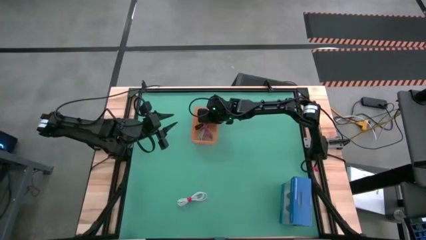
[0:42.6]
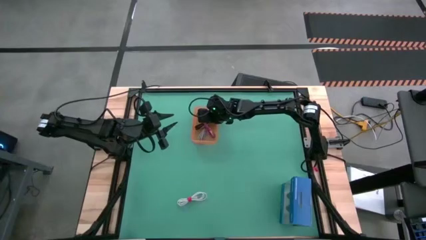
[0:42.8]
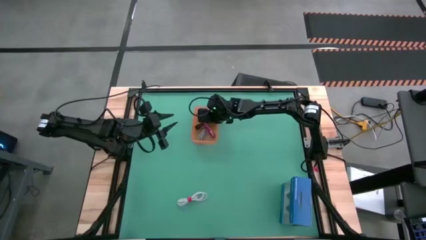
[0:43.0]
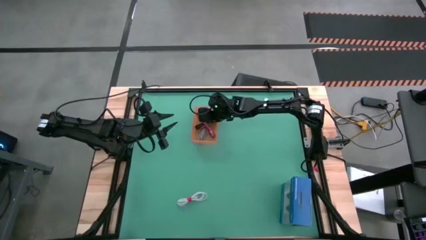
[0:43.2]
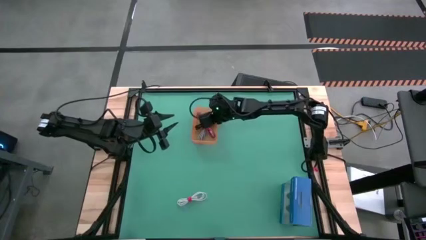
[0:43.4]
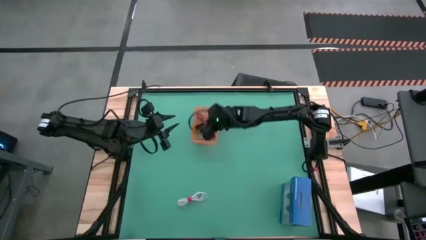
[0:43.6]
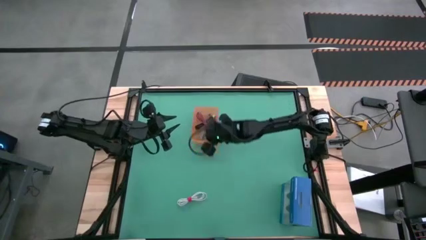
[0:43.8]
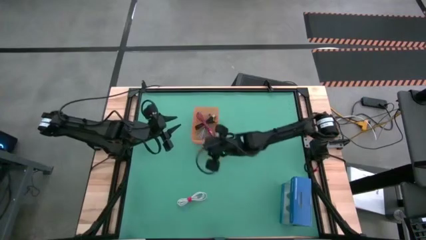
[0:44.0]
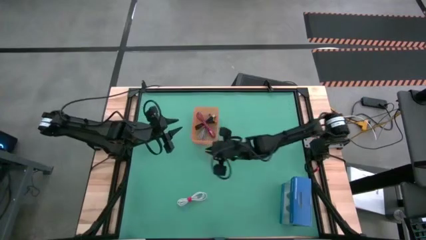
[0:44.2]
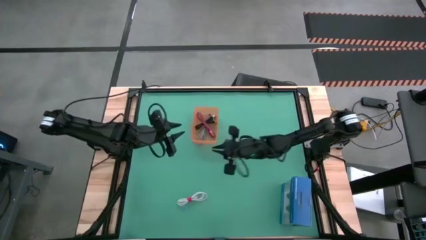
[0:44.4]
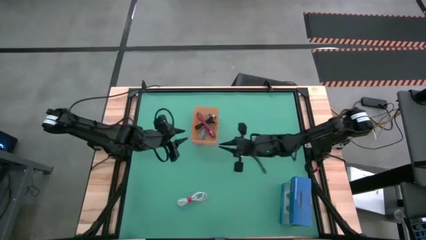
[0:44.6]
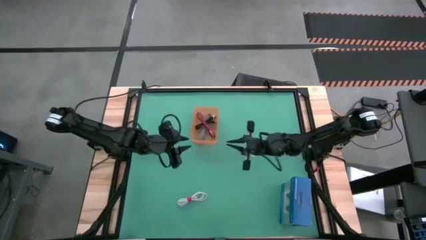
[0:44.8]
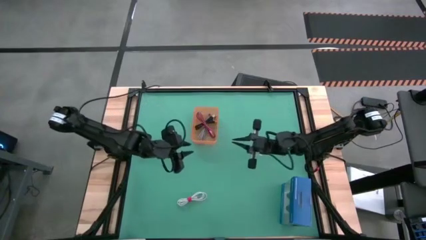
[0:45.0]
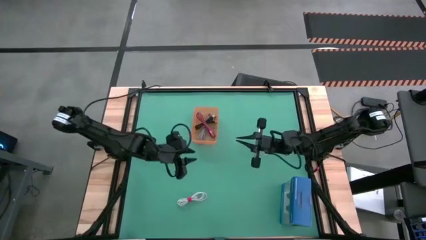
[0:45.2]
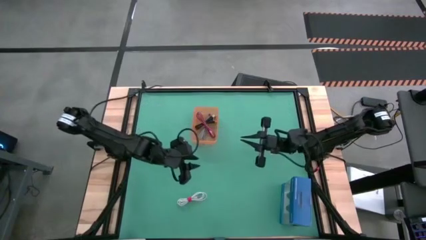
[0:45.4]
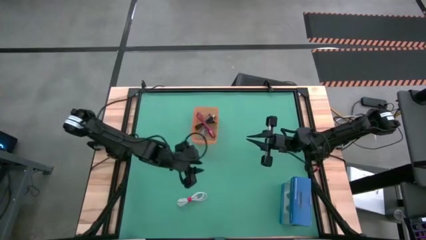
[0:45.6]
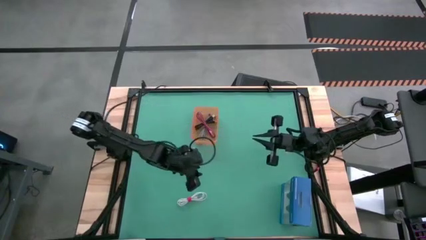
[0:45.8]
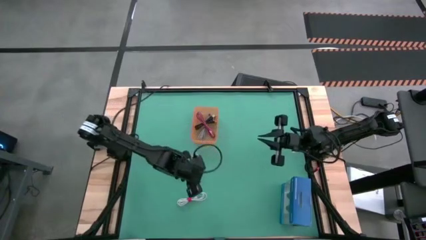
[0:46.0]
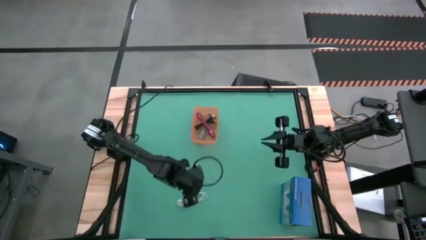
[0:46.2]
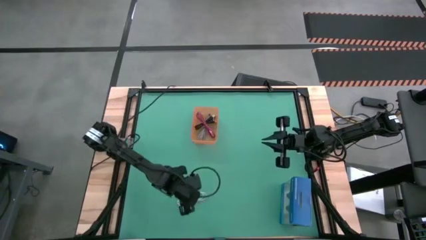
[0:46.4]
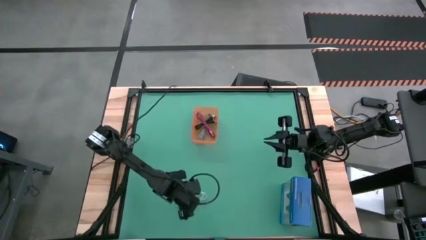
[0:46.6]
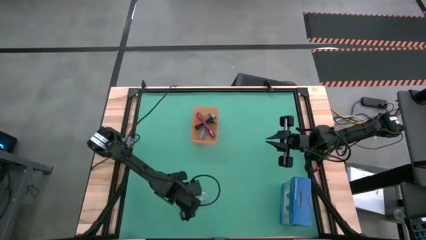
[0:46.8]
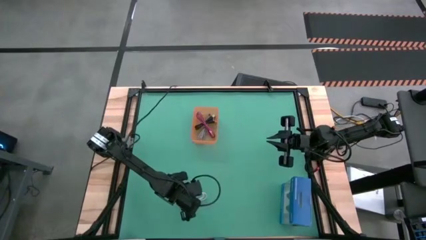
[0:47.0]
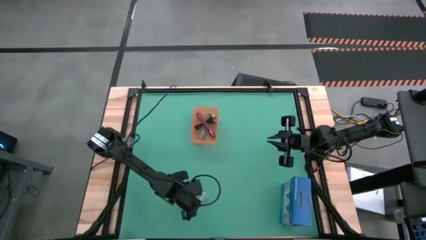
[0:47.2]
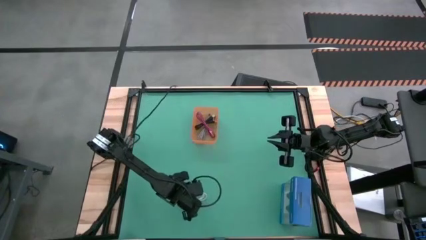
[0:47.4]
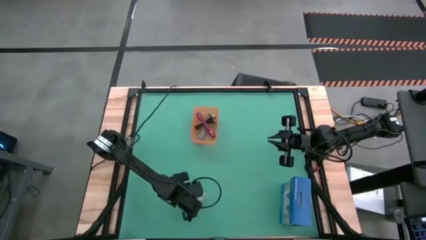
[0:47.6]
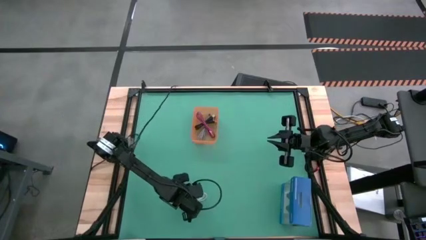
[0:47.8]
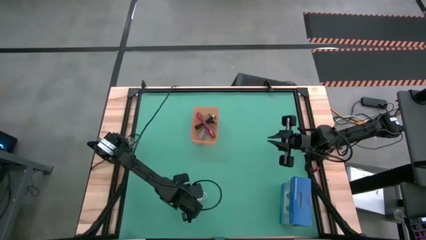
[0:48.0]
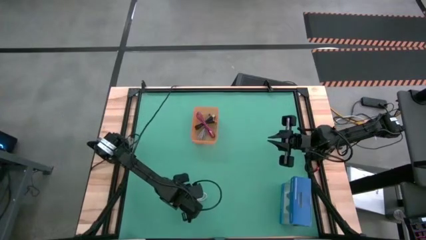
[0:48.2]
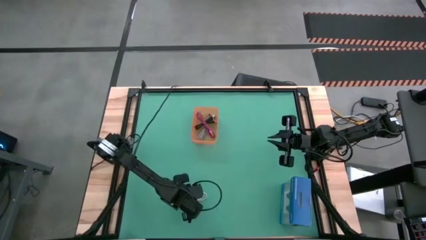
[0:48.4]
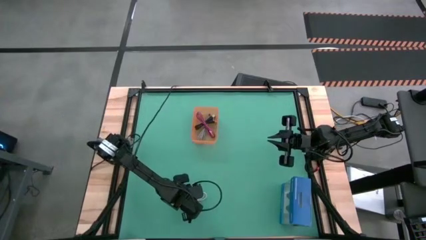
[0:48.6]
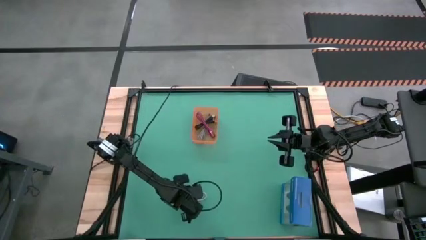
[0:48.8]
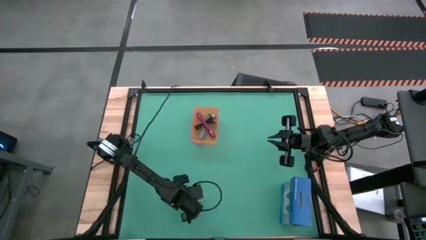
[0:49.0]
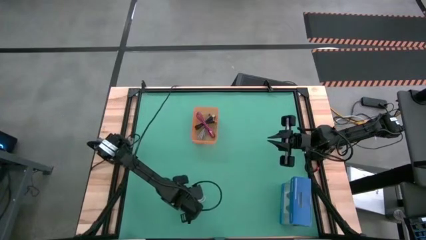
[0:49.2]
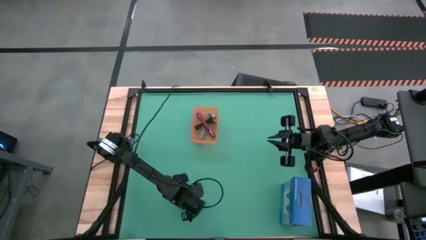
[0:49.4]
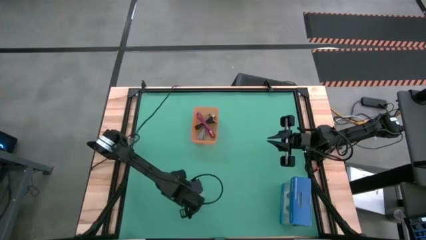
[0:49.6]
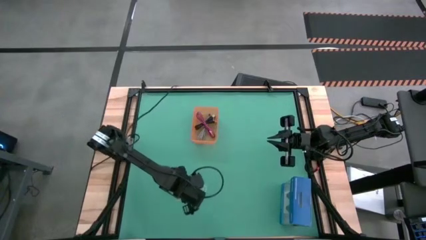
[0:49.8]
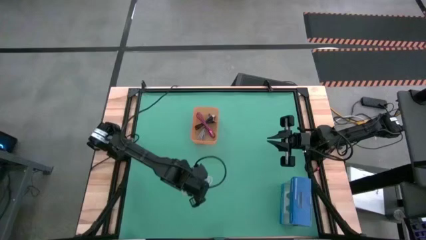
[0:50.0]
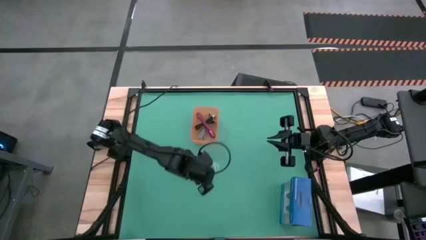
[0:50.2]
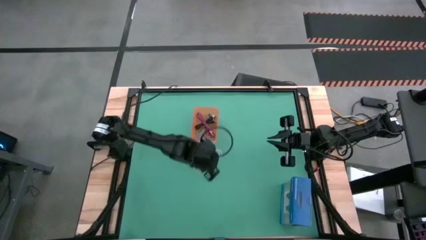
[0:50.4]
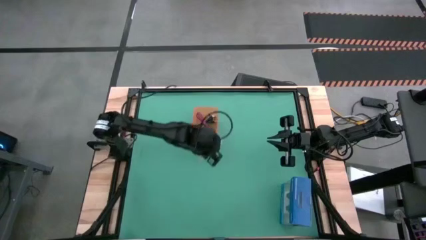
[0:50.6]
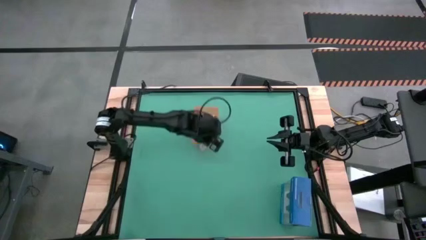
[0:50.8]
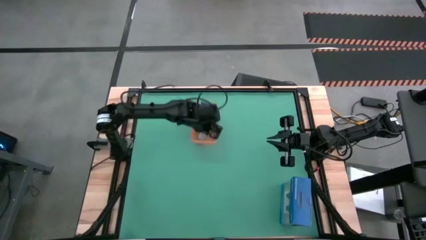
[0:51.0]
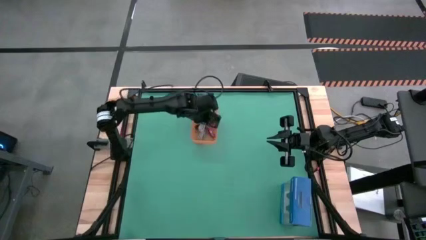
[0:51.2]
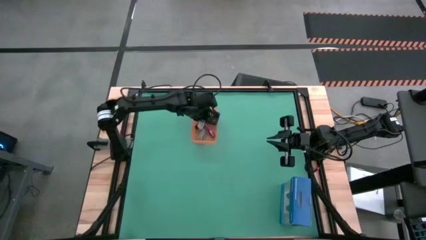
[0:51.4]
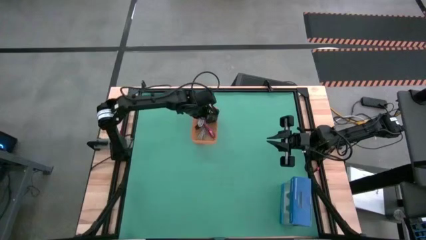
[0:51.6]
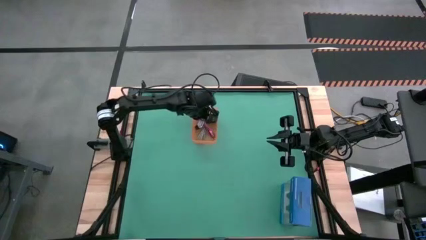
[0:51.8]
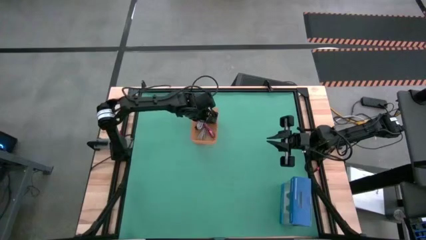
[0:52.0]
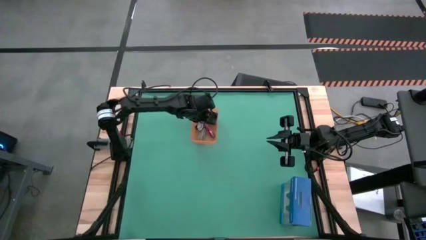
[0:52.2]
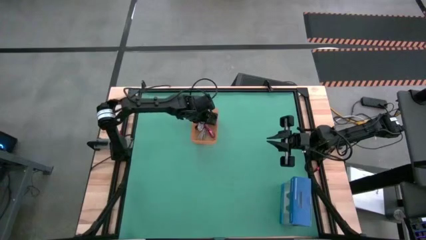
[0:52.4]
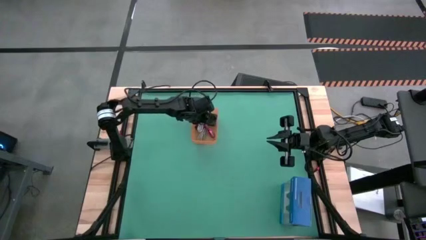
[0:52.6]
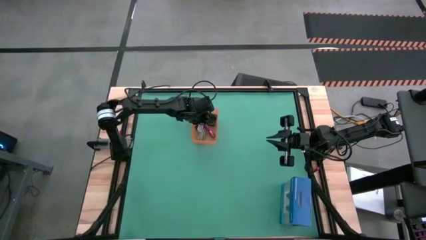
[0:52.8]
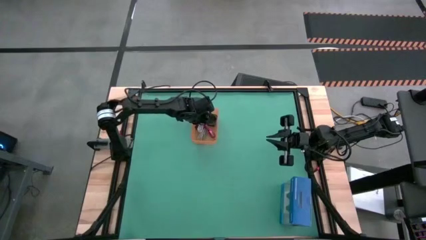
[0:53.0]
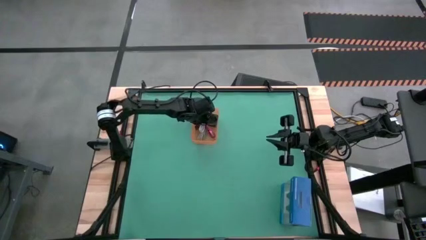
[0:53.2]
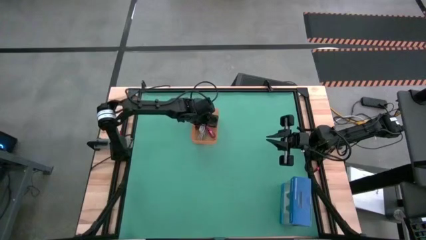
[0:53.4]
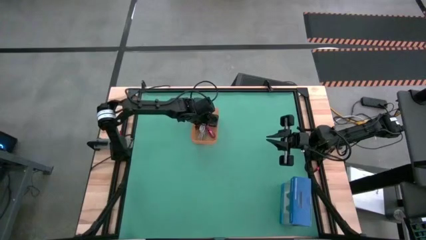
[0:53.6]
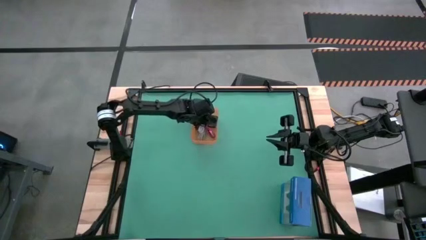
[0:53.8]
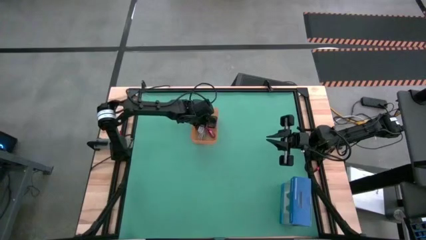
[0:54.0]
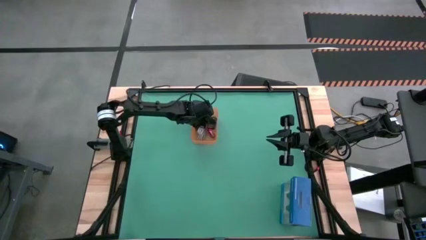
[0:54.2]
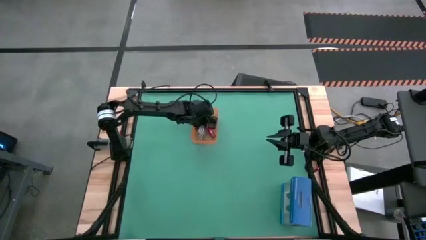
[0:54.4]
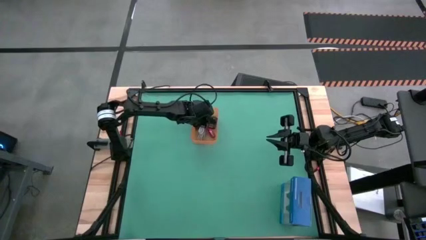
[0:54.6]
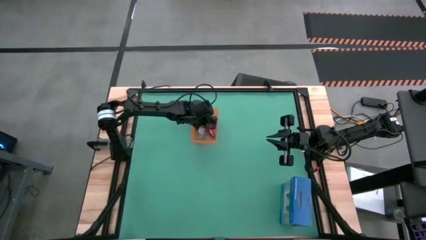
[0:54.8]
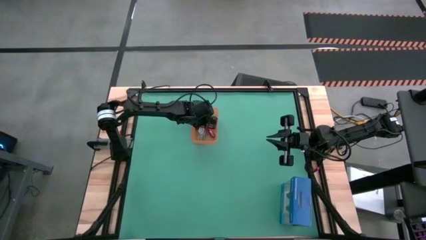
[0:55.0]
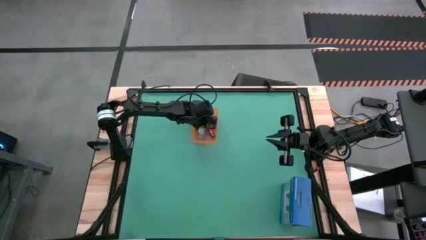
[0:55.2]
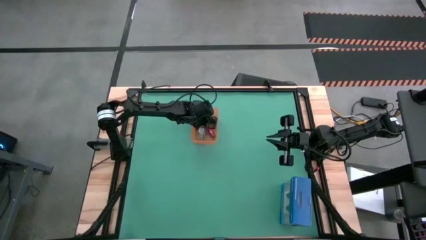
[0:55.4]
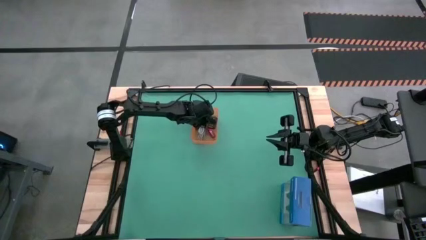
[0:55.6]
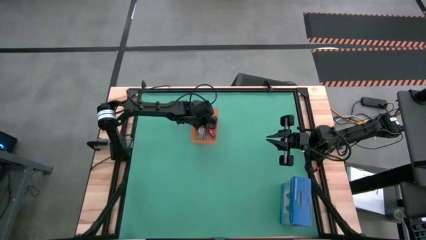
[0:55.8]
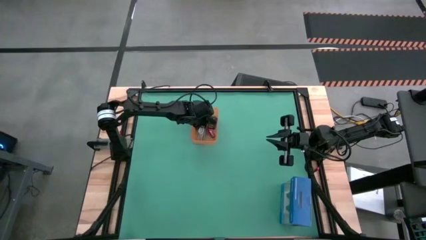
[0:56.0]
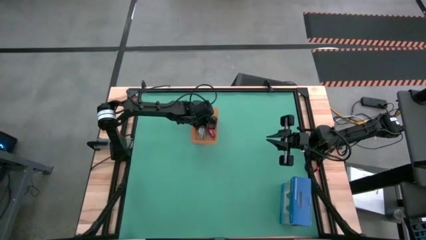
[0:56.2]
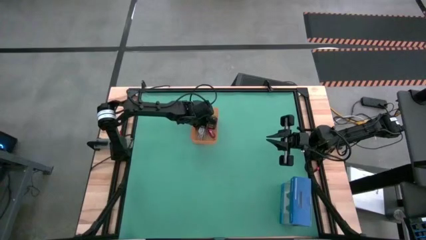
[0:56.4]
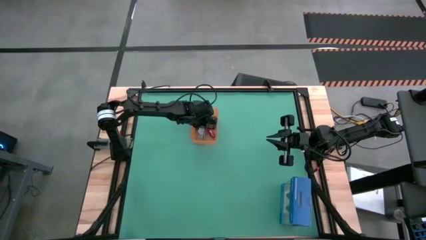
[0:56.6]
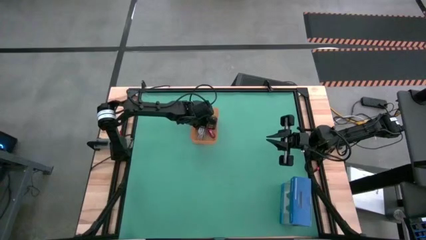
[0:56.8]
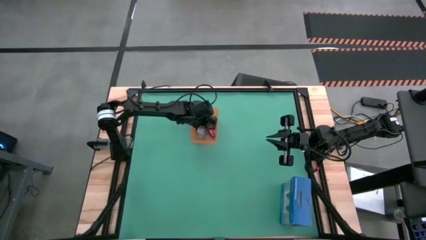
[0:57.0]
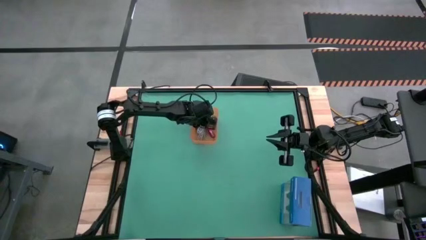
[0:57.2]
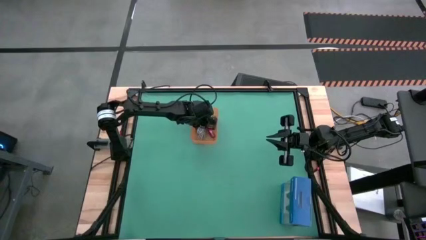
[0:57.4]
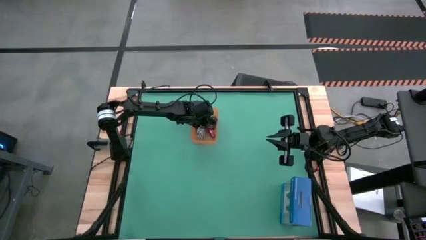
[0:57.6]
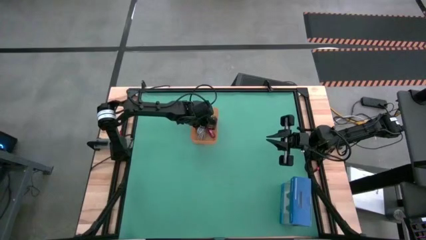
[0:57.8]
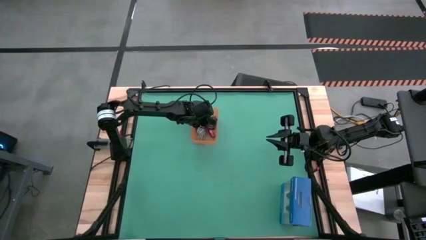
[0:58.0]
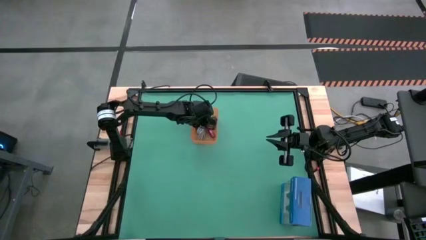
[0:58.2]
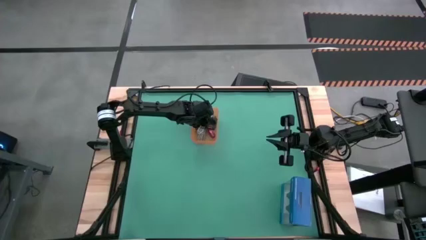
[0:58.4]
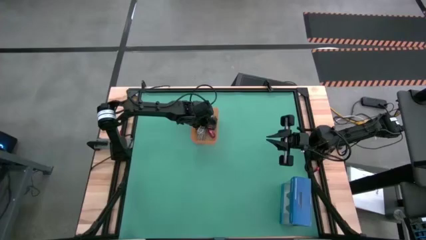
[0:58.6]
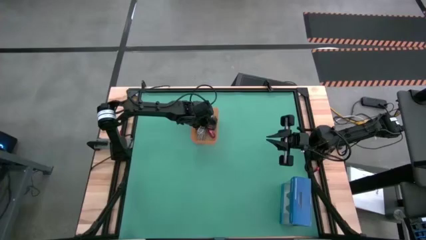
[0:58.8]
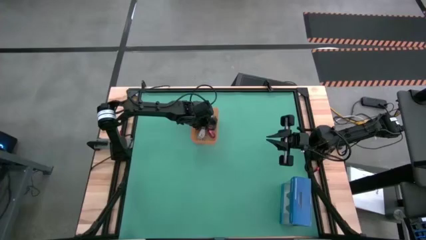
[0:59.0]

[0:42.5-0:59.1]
Task: Pick and place USB-C Cables
Put the white charger cable into the orange bin
